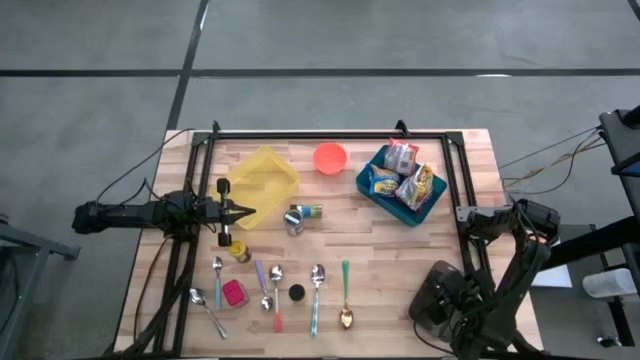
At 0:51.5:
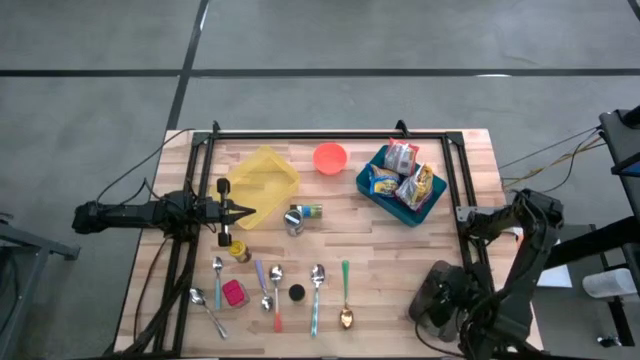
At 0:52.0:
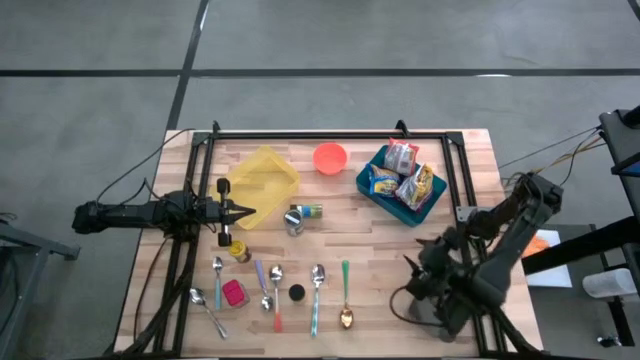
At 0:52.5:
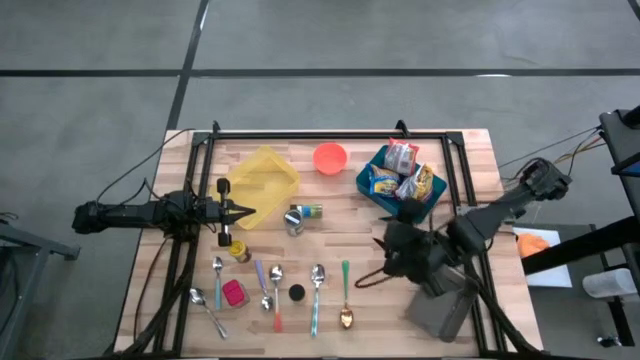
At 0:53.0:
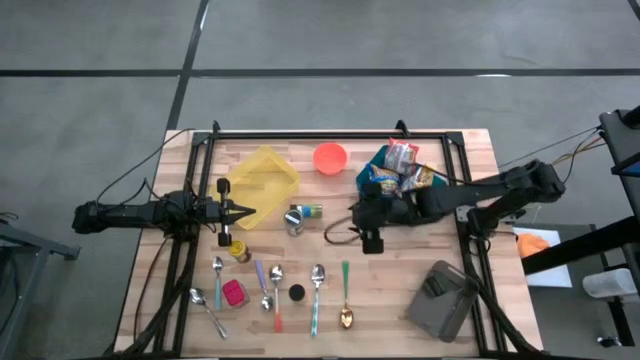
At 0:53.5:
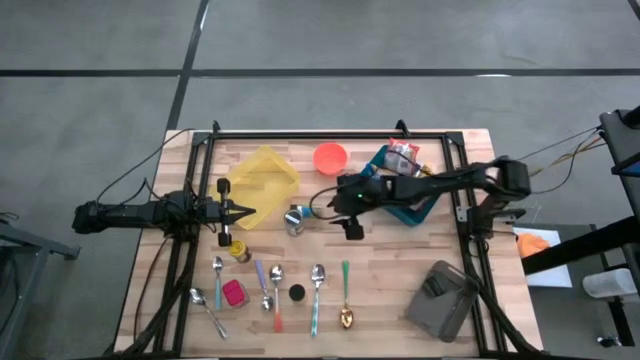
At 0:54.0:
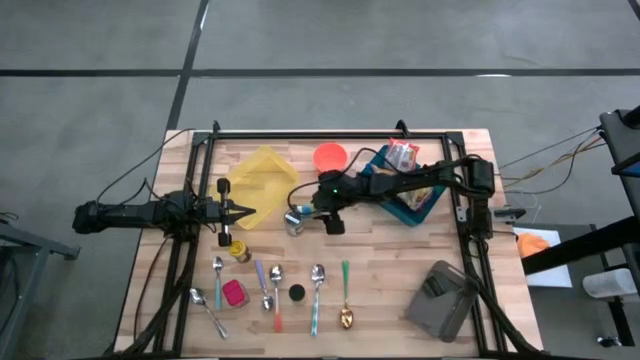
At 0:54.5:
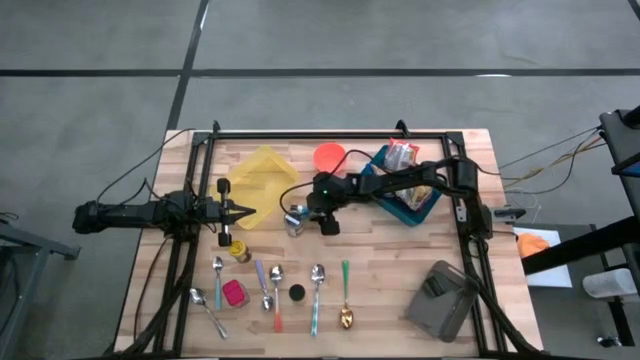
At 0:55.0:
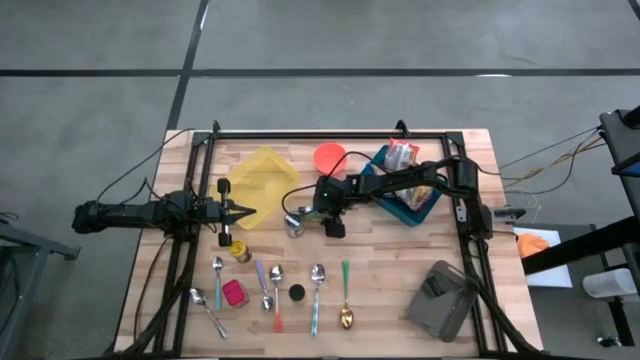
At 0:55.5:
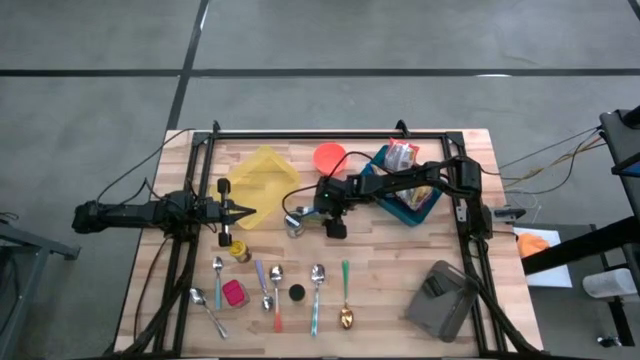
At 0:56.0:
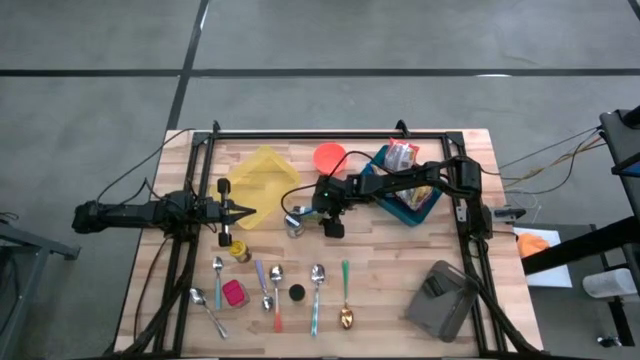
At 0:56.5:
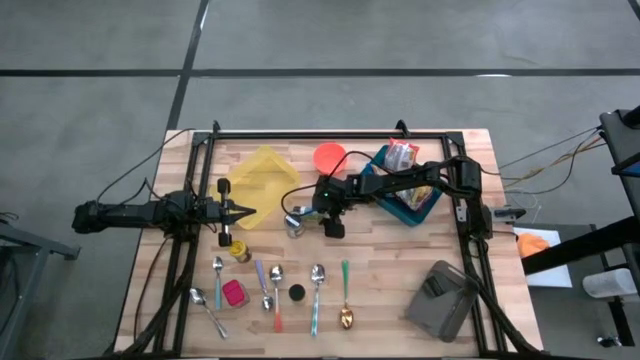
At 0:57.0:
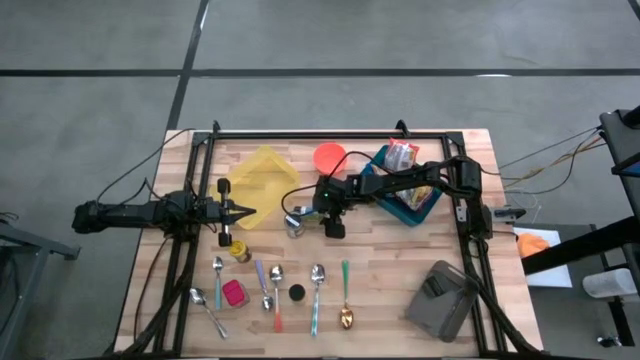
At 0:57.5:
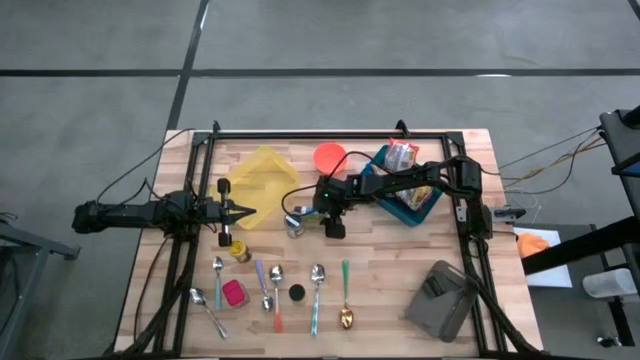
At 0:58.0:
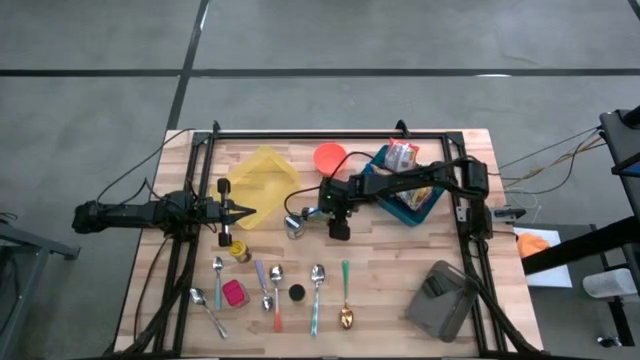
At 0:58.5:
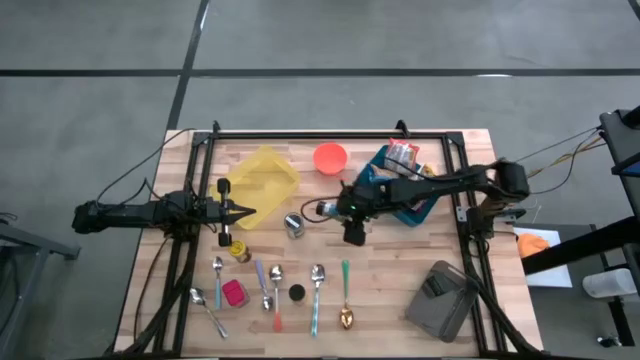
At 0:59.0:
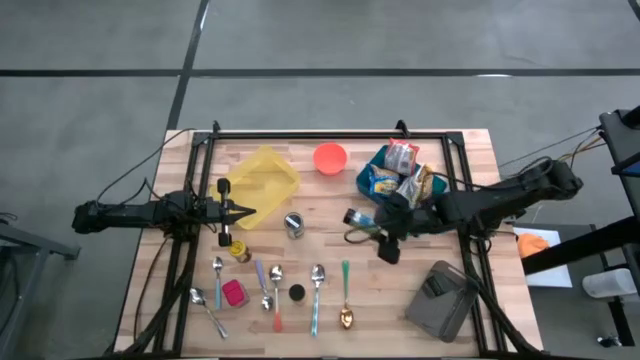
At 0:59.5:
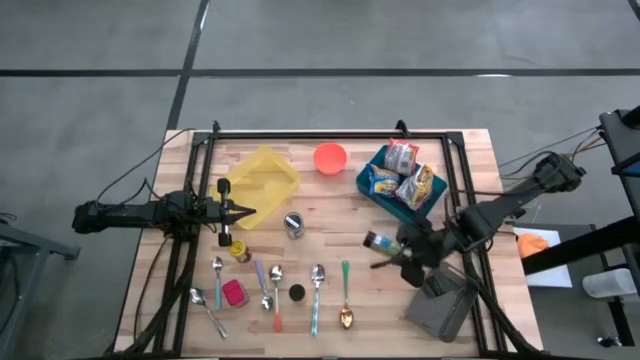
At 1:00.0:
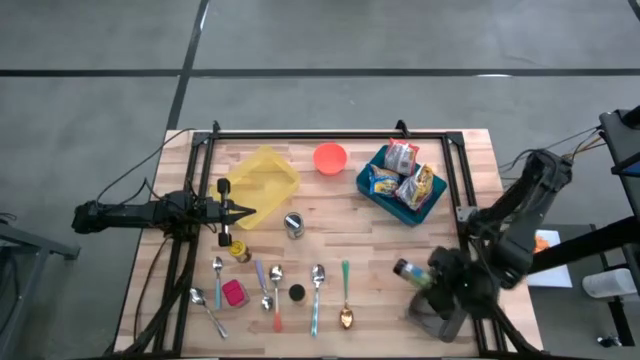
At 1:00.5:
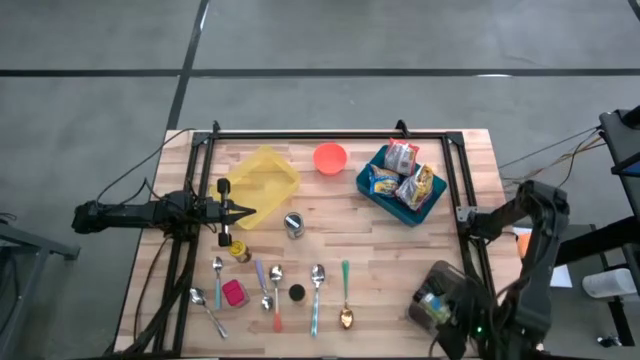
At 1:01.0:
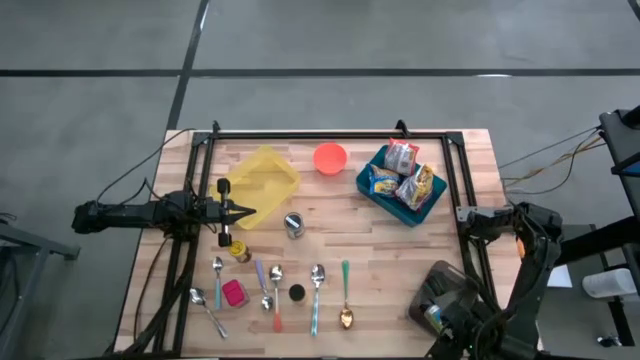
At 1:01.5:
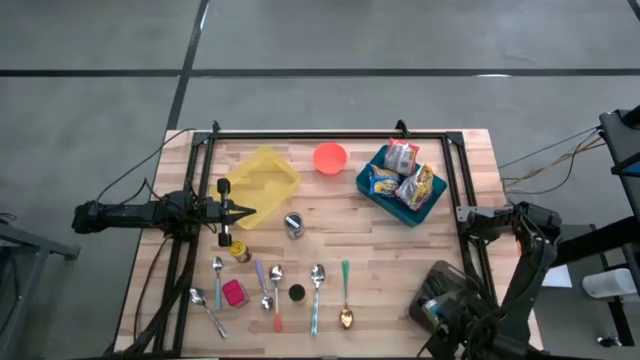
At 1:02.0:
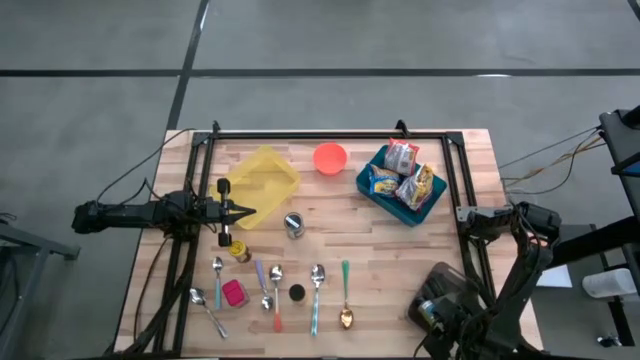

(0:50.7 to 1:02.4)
Put the green seasoning bottle into the black bin

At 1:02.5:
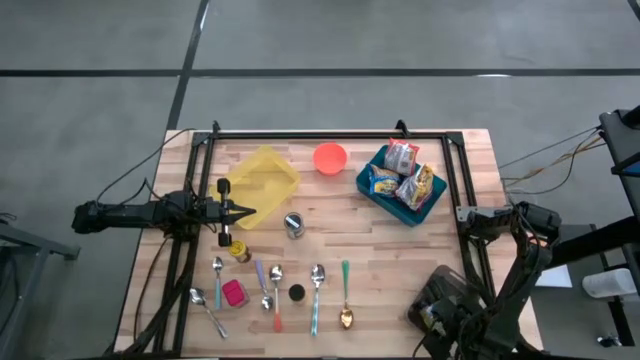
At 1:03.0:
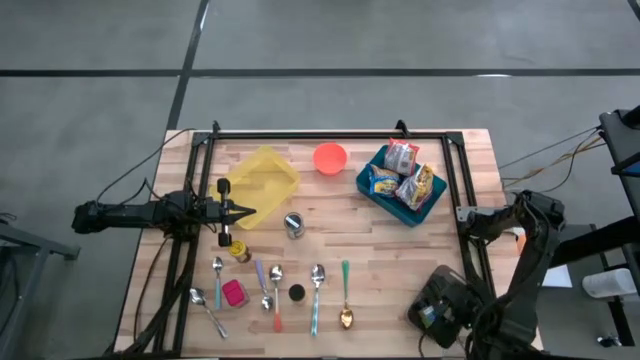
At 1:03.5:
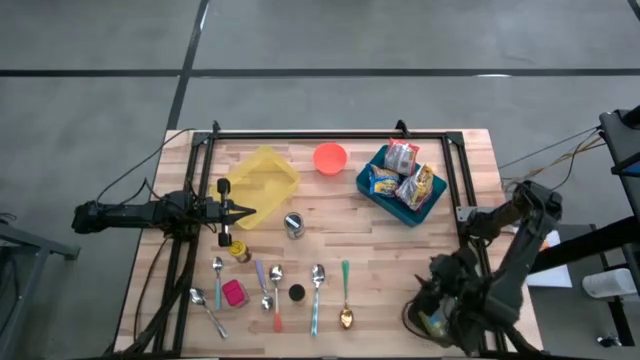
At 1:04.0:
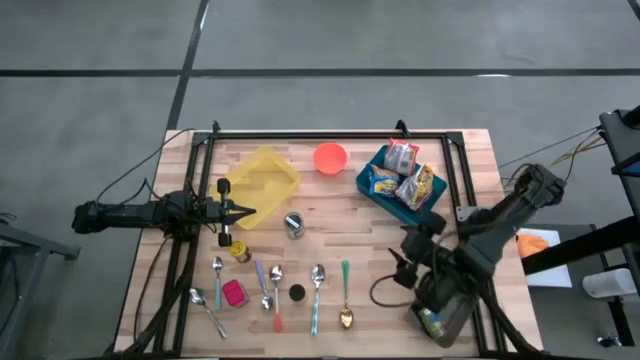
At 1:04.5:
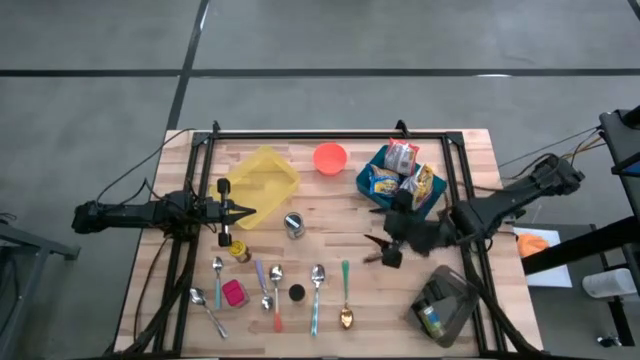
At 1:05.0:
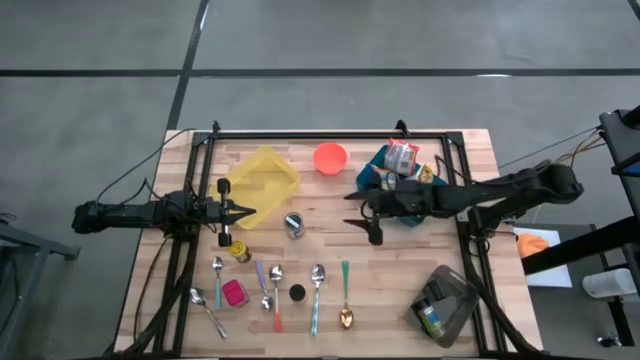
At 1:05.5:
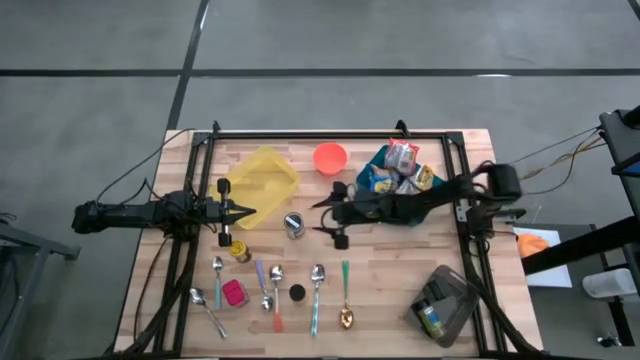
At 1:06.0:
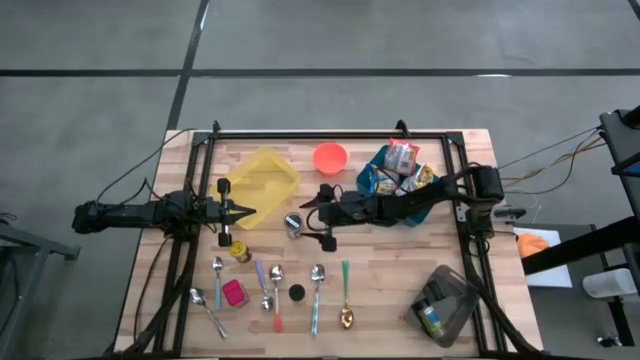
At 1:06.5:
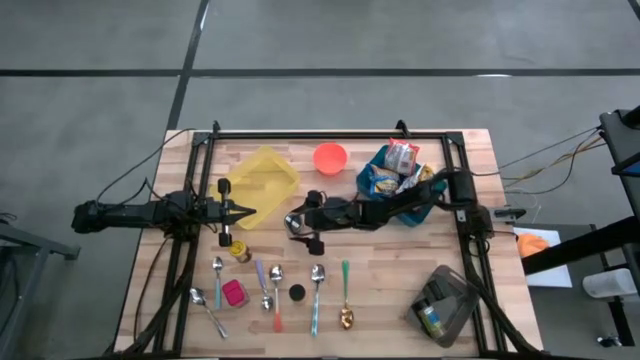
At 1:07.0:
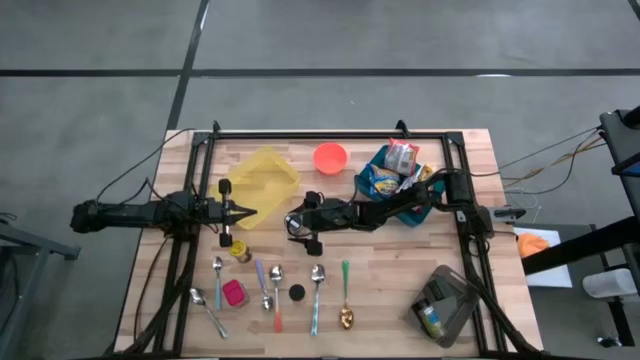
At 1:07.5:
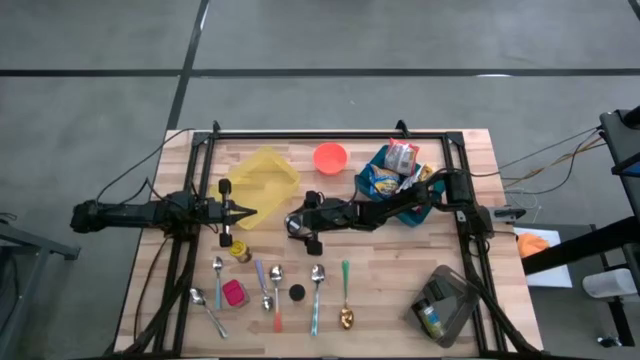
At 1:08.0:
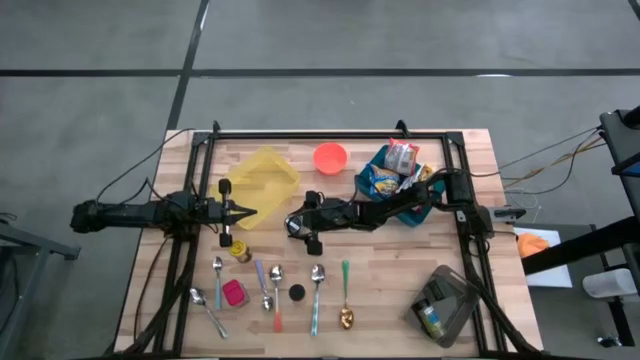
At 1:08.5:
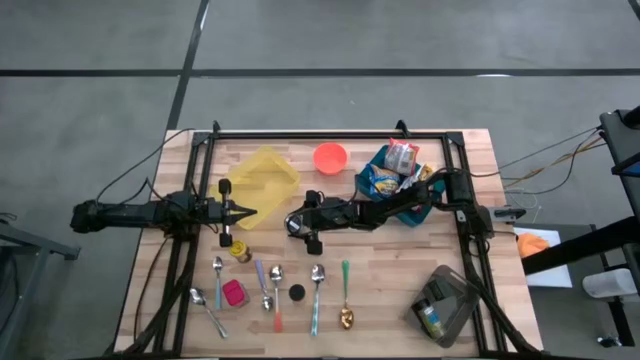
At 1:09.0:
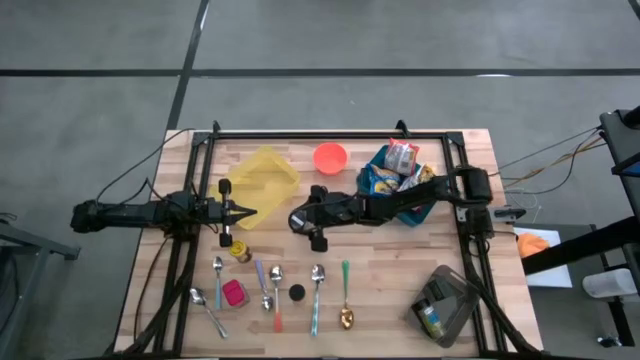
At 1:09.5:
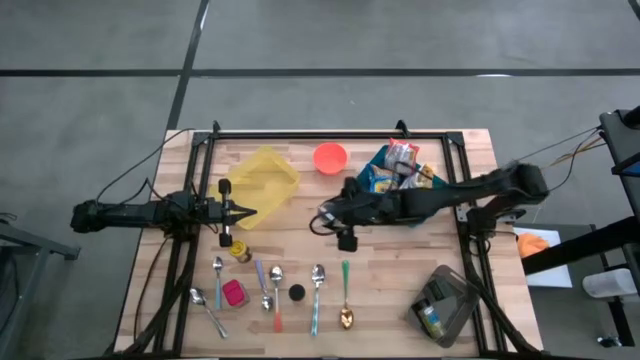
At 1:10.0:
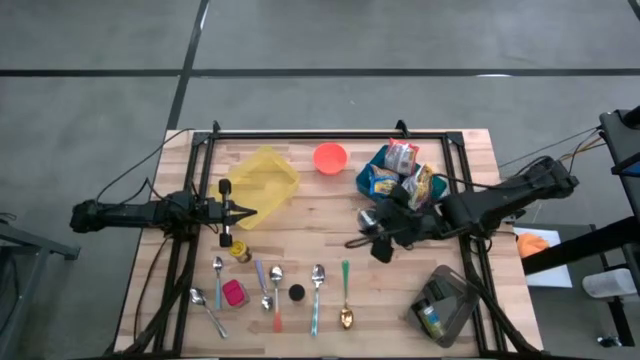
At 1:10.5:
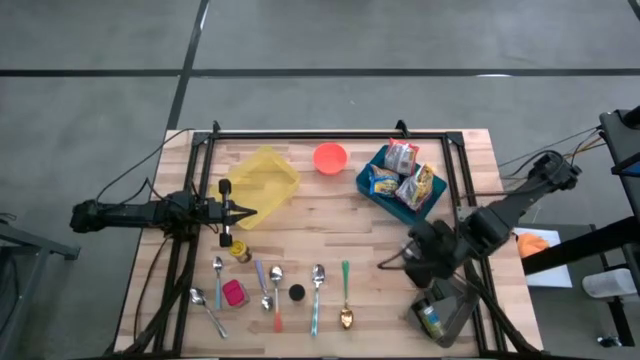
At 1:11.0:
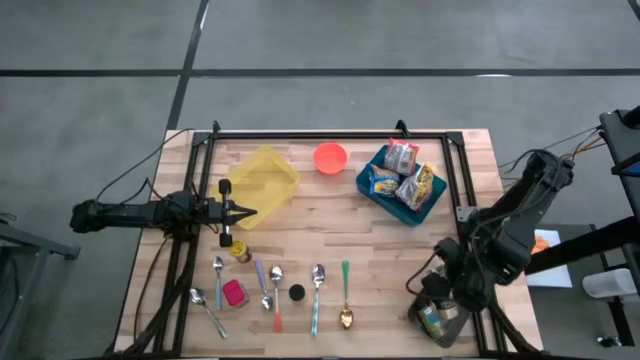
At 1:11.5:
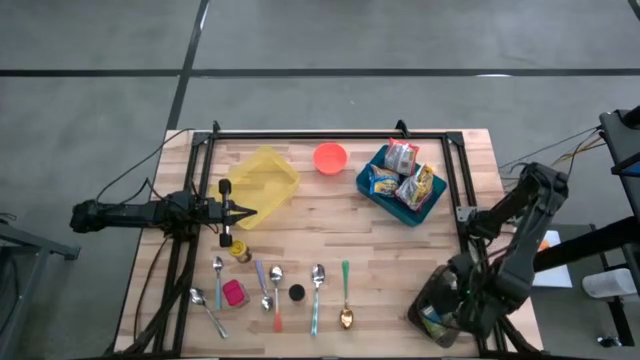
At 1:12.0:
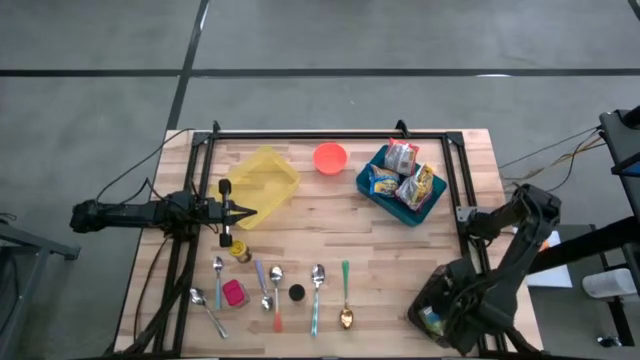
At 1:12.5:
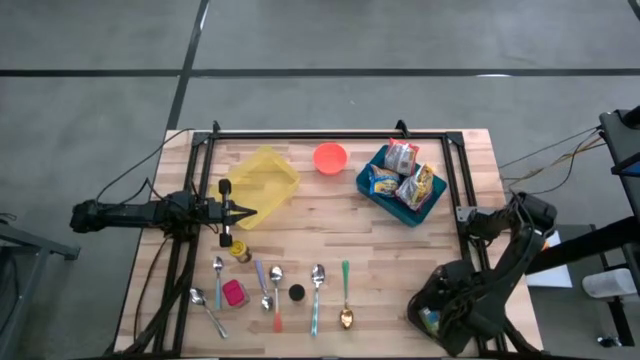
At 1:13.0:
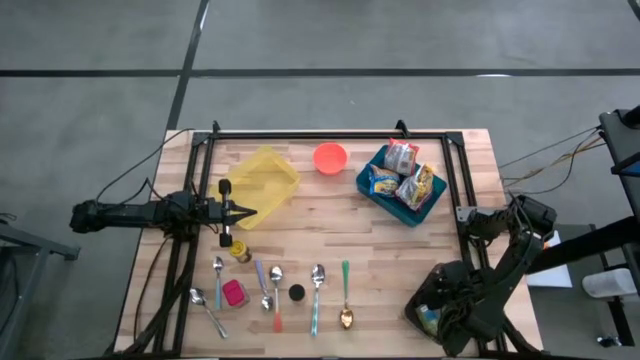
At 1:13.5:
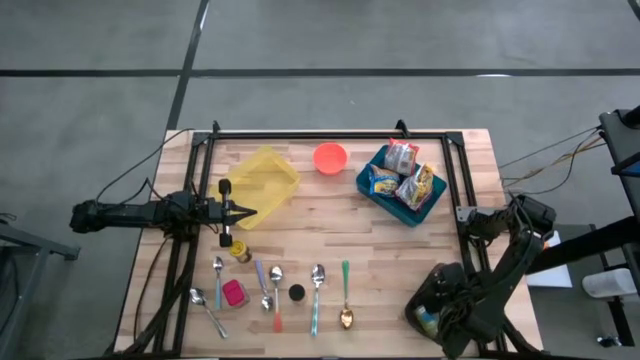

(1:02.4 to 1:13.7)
Put the brown seasoning bottle into the black bin
